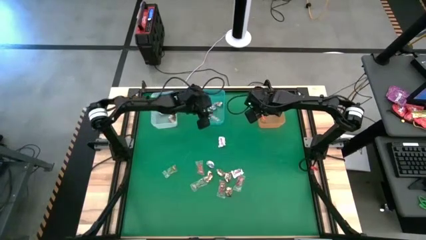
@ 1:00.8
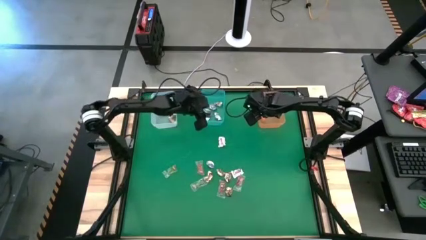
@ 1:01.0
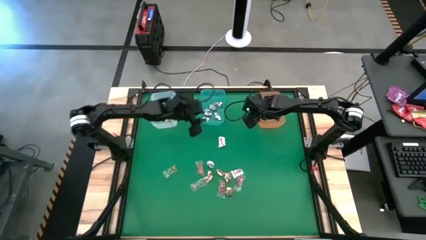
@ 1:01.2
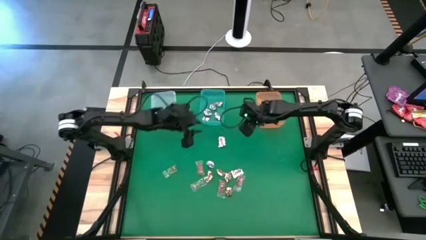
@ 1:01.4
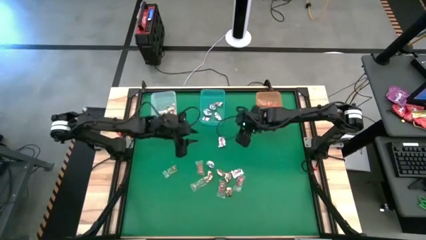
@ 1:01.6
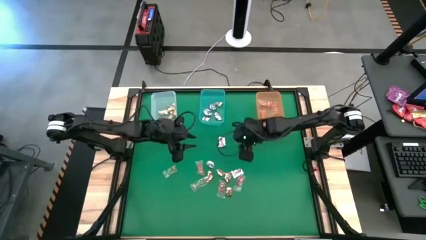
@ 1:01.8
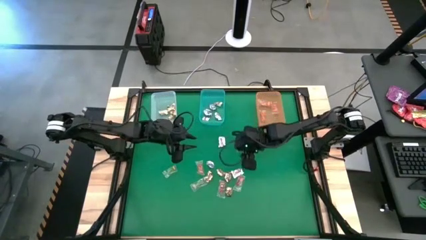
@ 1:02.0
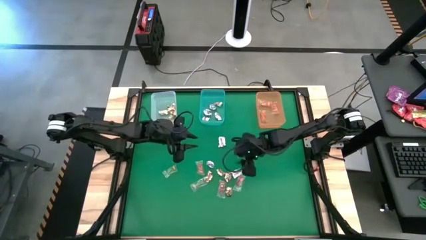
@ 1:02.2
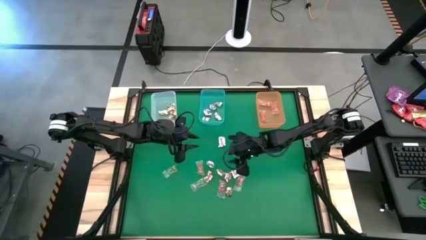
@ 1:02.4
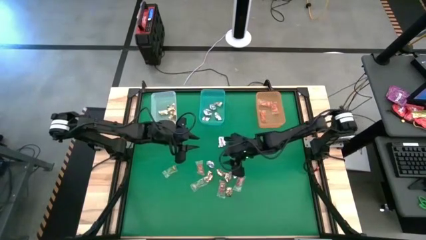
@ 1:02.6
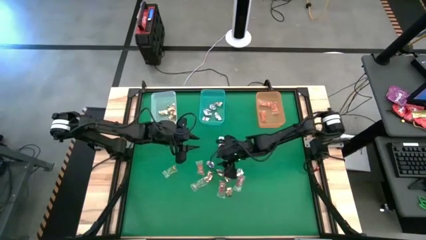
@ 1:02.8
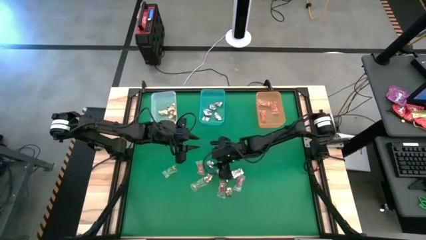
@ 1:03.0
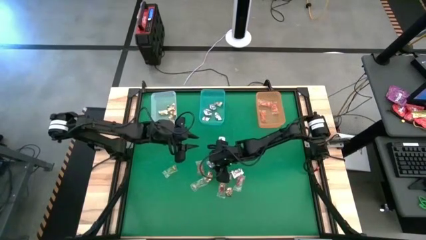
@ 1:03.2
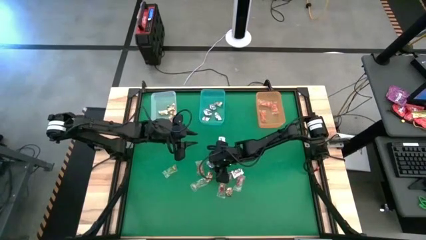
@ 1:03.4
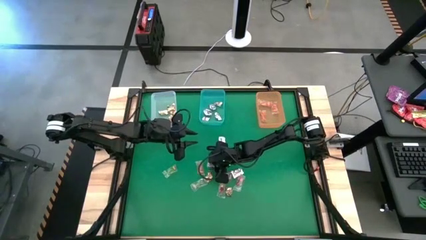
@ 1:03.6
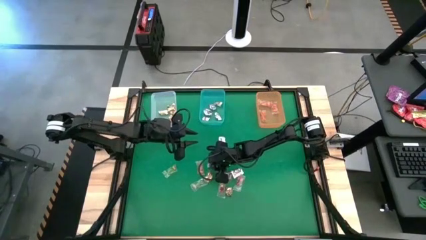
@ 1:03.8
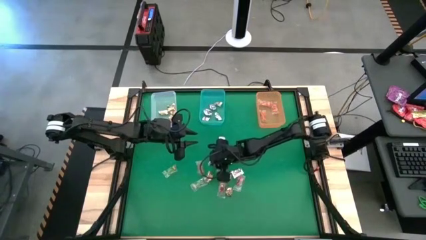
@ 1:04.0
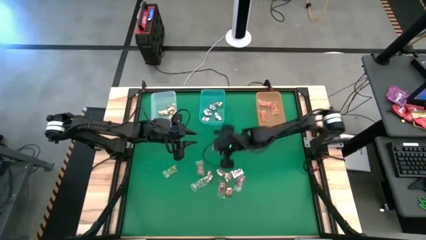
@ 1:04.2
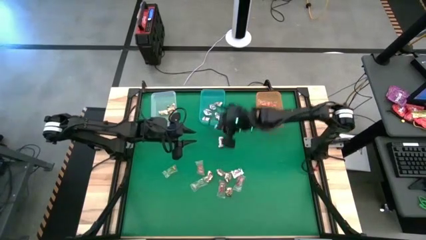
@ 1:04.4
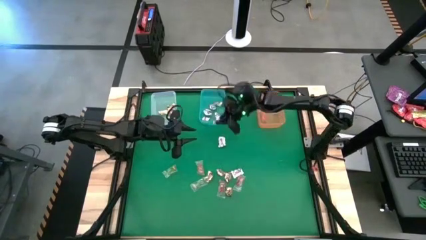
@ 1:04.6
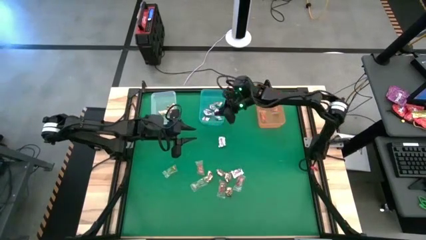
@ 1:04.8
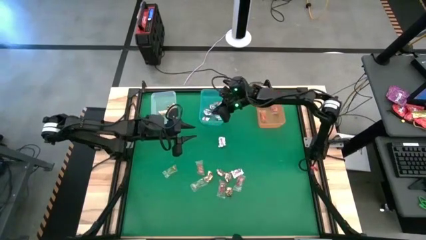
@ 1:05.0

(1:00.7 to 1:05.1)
Task: Sort candy by brand, put in halloween buckets
Put the silver wrap candy into the blue bin

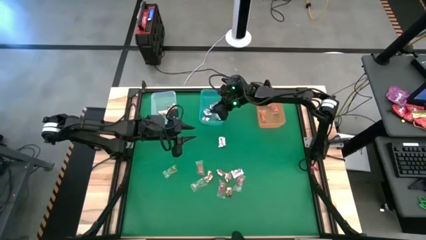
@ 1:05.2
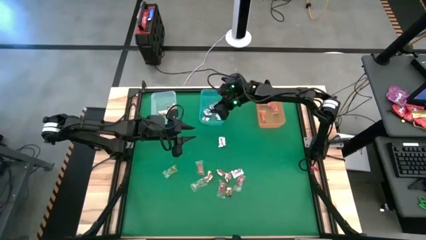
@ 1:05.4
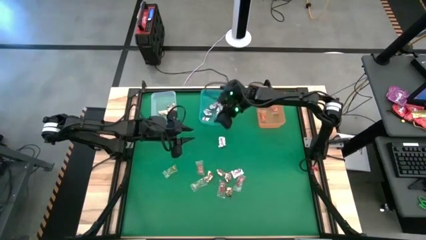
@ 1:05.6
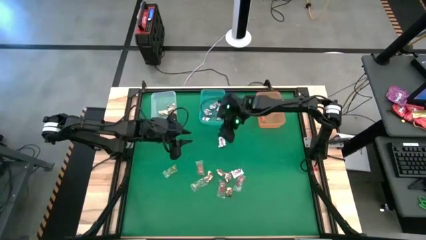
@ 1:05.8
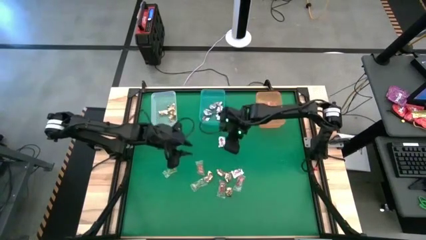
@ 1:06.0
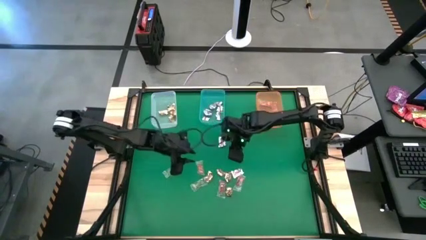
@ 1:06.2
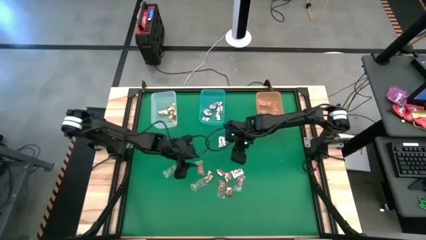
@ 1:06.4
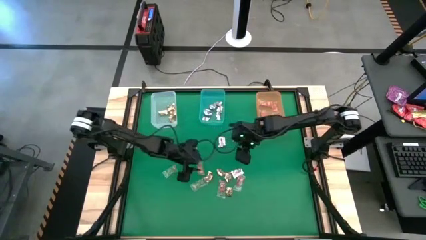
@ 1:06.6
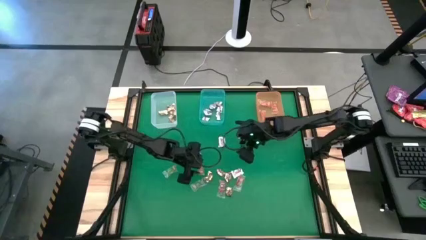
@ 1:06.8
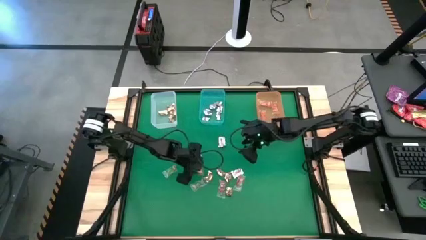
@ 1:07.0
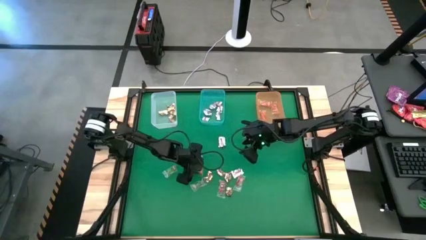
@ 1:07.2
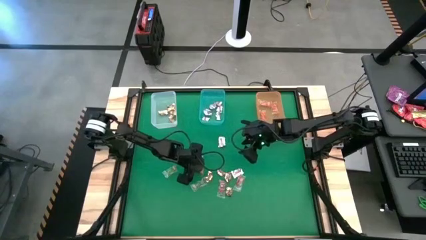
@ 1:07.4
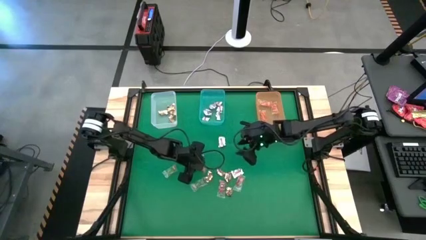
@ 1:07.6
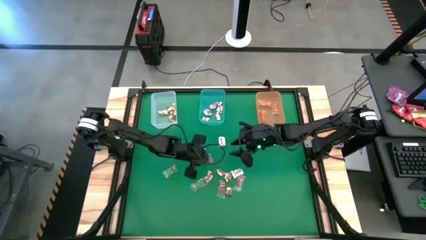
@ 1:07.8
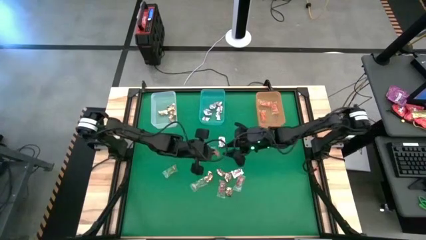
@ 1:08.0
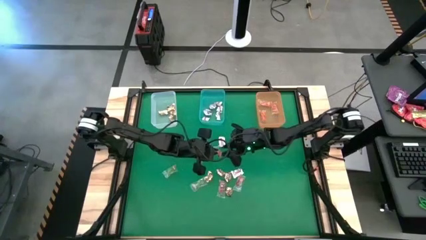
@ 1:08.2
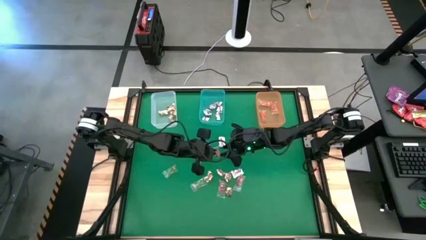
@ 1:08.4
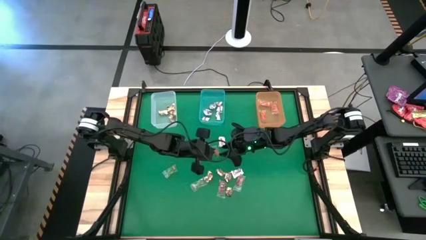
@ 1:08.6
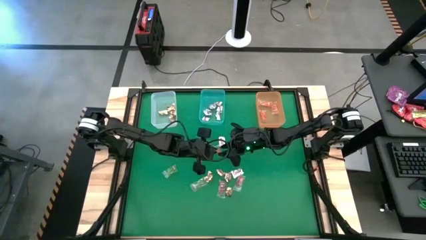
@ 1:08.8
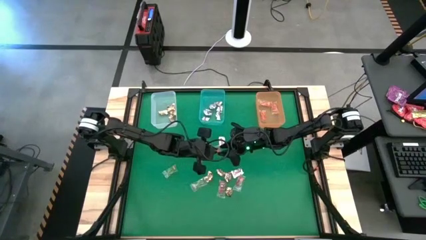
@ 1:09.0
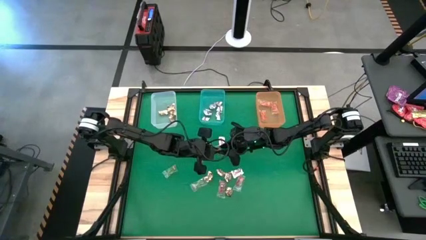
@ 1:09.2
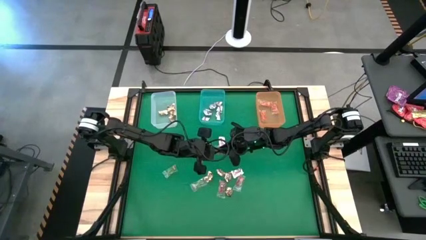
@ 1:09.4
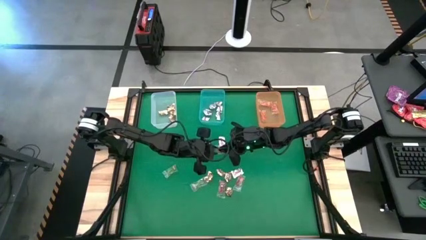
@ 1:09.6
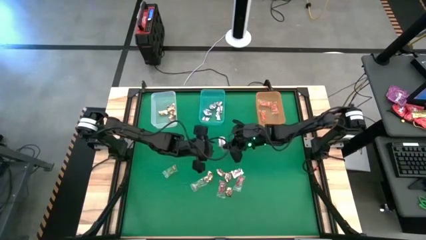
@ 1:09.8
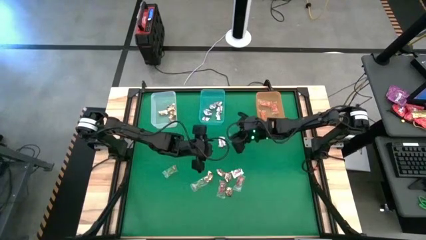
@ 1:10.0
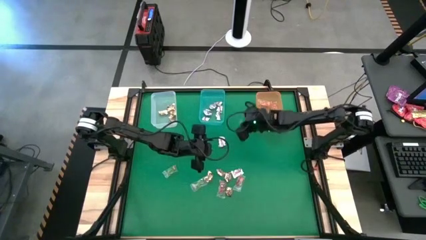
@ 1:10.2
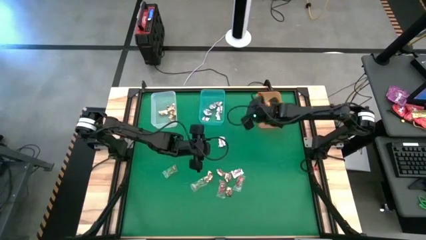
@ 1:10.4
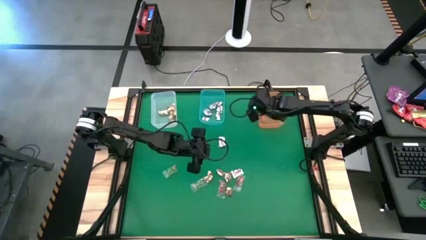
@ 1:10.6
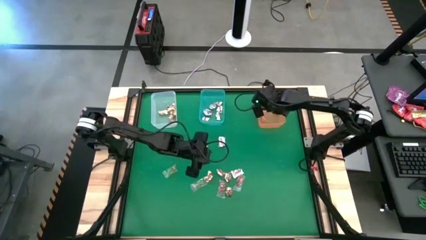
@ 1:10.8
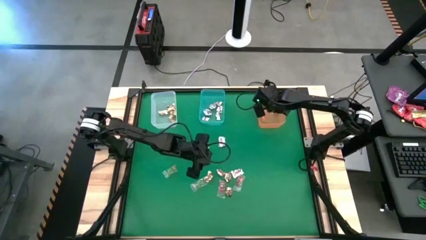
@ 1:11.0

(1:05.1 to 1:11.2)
Put the orange gummy into the orange bin

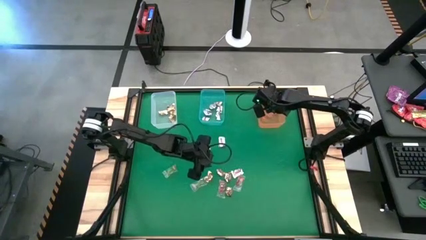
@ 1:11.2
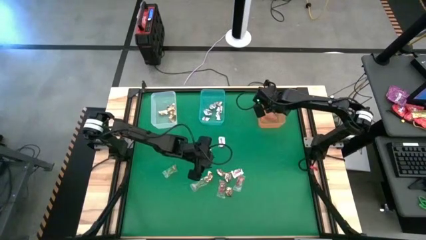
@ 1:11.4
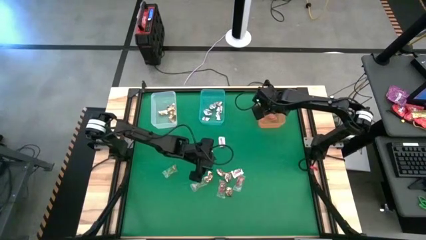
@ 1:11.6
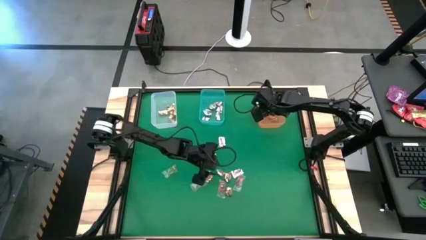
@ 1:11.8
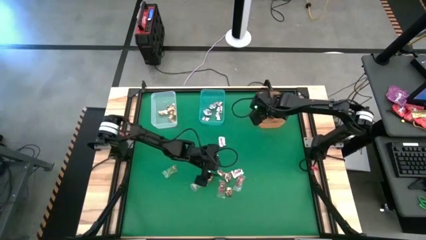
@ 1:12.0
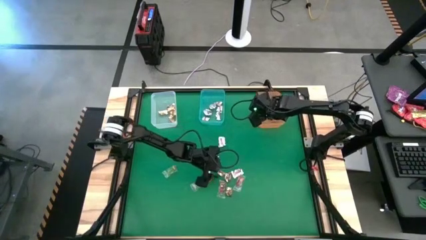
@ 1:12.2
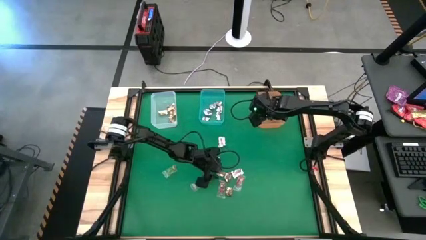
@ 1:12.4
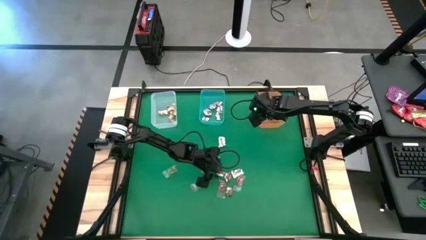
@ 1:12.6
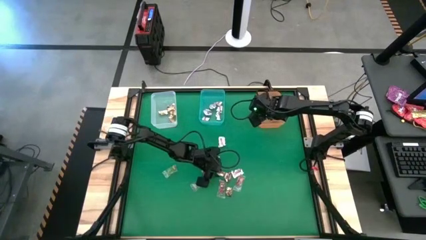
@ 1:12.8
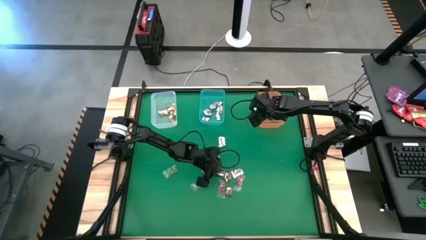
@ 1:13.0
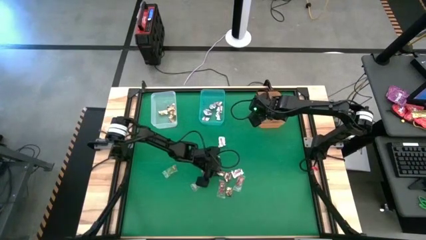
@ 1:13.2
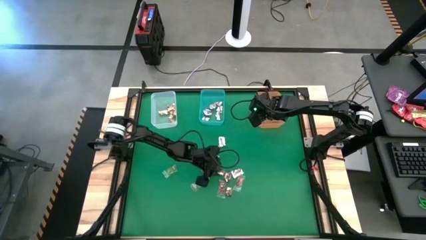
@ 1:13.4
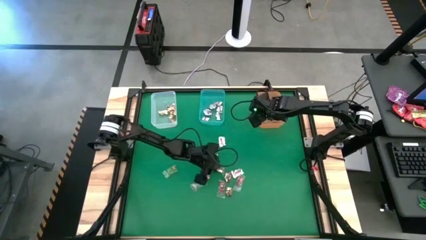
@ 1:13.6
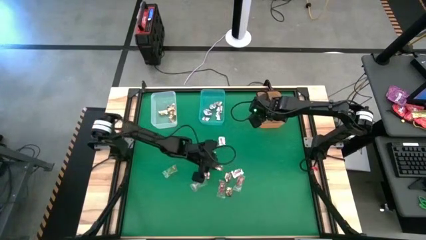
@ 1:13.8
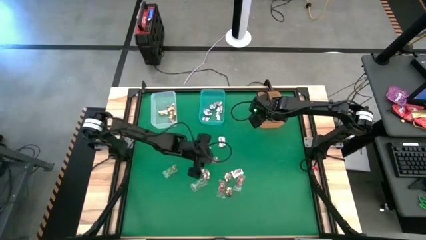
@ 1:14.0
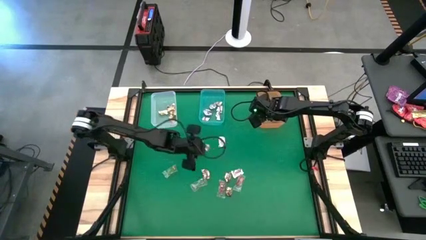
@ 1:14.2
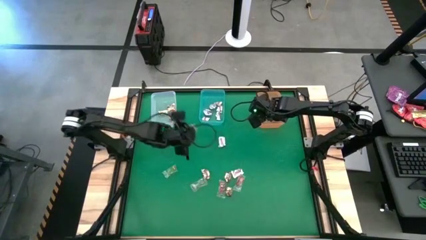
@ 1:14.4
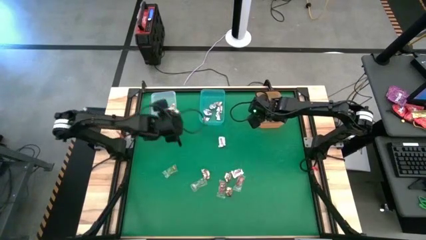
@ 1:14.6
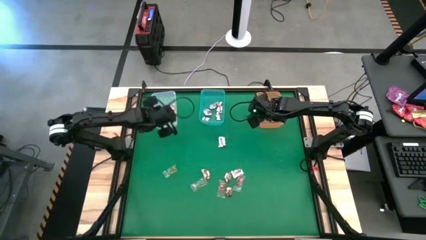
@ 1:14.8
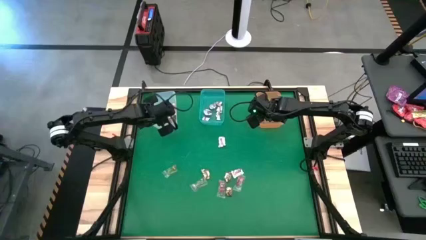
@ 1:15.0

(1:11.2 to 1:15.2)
Put the gold wrap candy into the white bin
